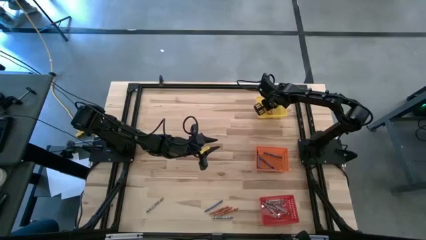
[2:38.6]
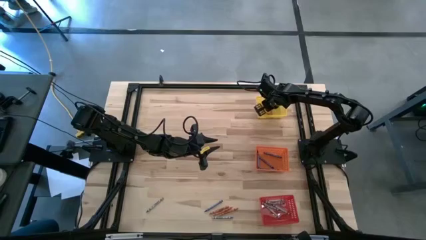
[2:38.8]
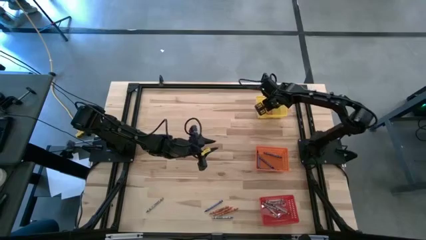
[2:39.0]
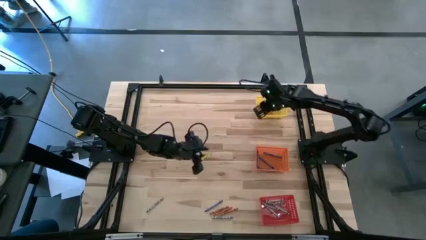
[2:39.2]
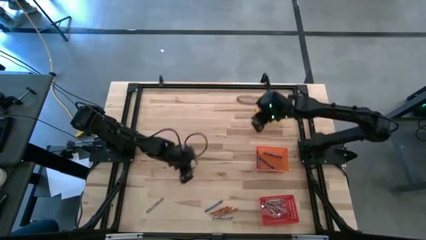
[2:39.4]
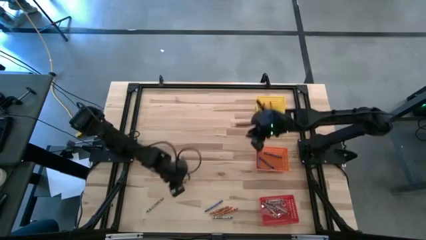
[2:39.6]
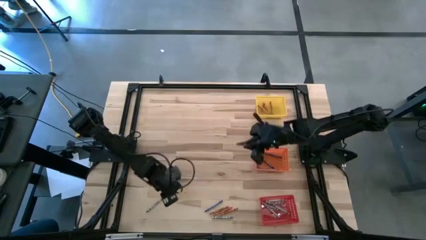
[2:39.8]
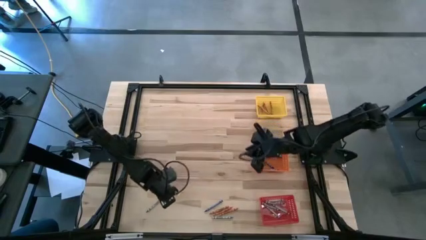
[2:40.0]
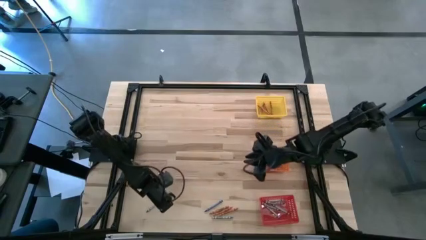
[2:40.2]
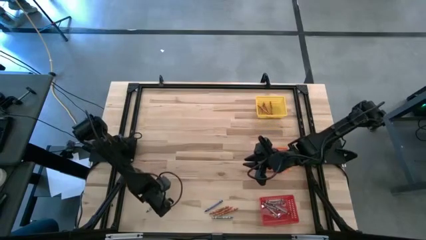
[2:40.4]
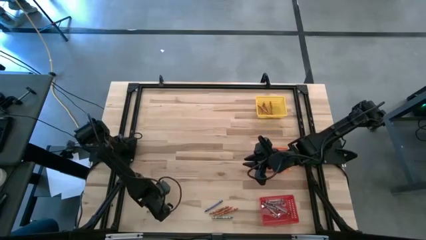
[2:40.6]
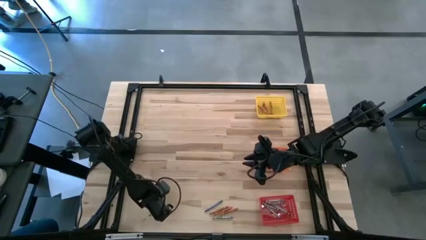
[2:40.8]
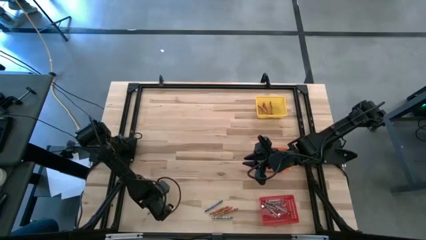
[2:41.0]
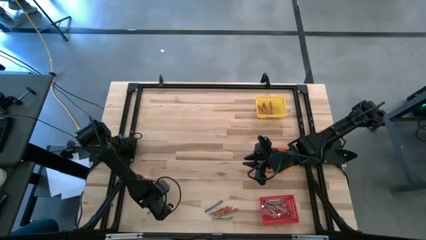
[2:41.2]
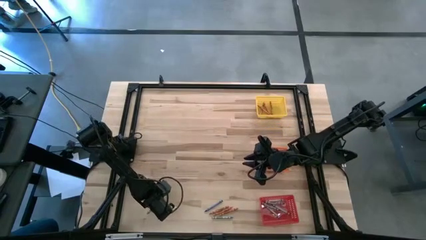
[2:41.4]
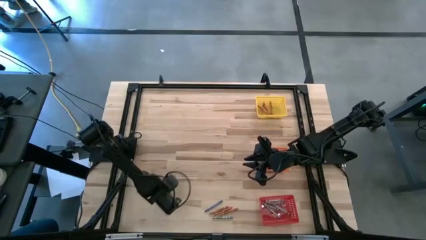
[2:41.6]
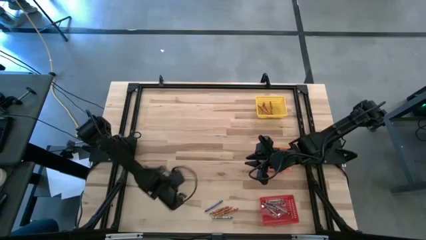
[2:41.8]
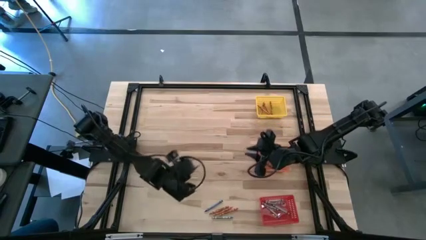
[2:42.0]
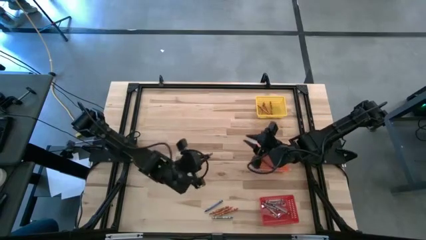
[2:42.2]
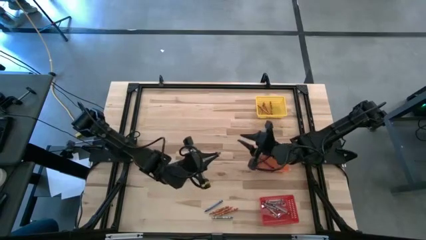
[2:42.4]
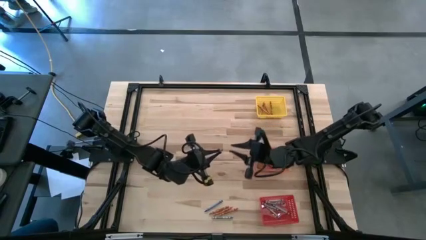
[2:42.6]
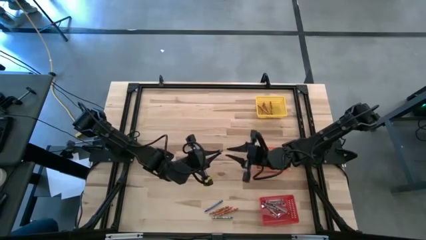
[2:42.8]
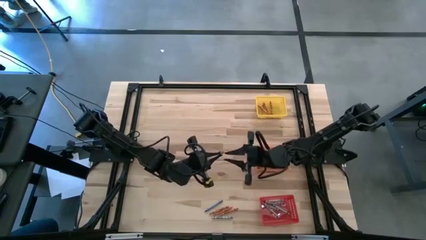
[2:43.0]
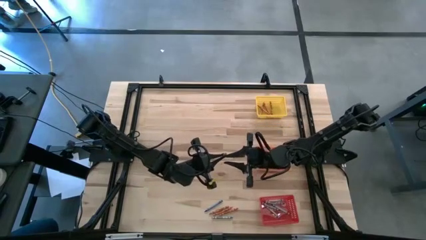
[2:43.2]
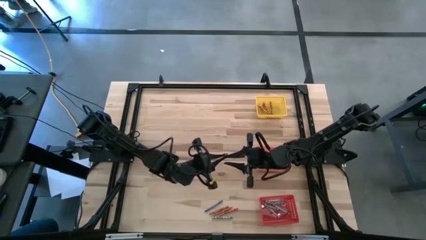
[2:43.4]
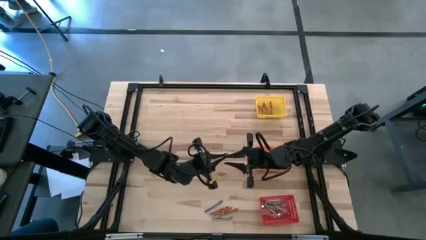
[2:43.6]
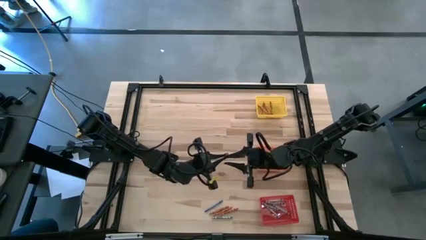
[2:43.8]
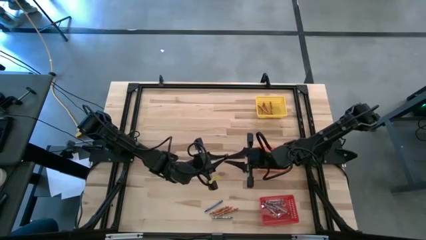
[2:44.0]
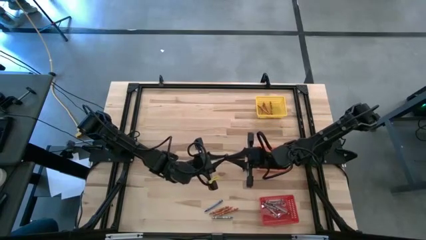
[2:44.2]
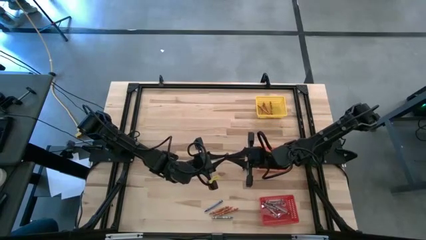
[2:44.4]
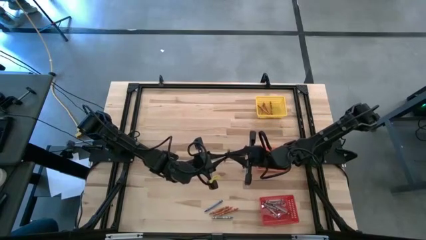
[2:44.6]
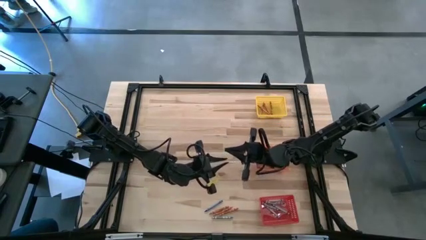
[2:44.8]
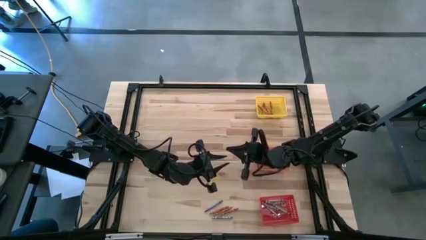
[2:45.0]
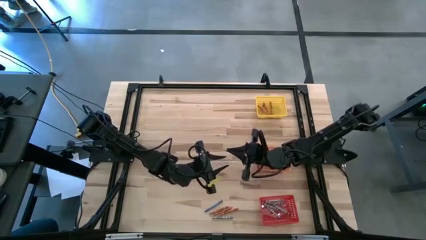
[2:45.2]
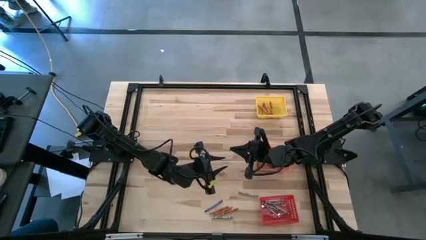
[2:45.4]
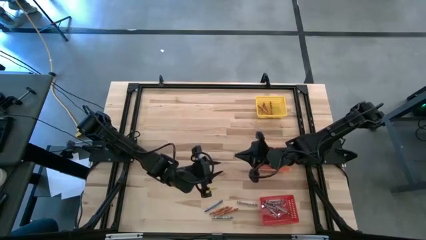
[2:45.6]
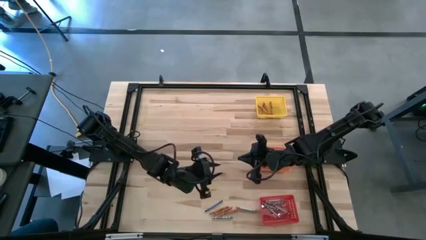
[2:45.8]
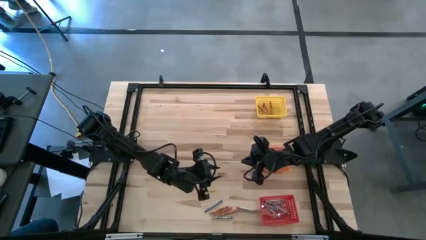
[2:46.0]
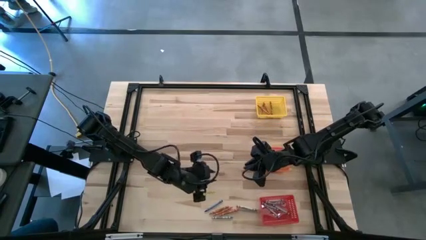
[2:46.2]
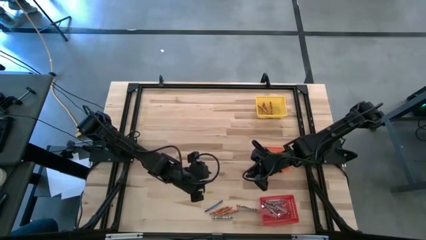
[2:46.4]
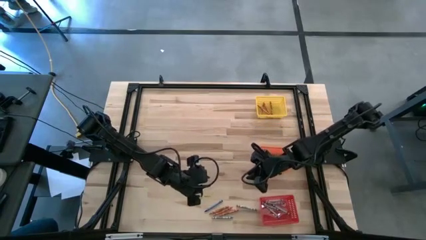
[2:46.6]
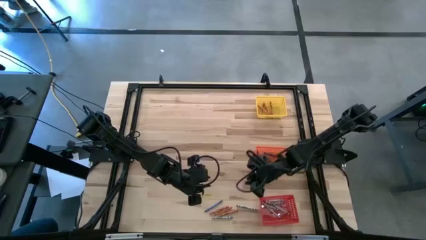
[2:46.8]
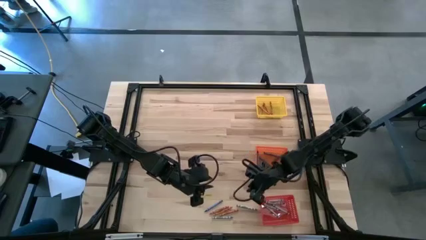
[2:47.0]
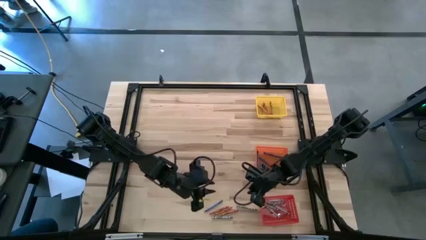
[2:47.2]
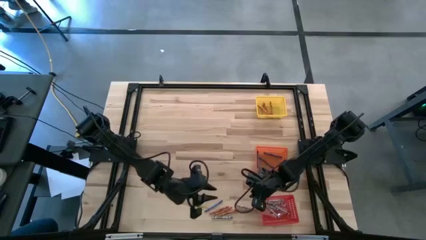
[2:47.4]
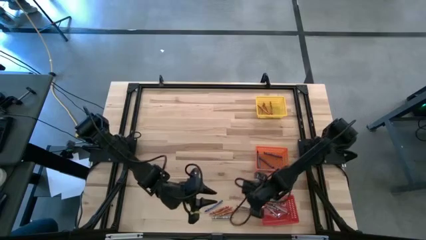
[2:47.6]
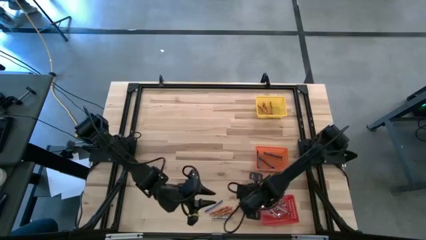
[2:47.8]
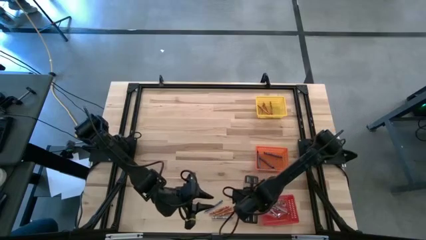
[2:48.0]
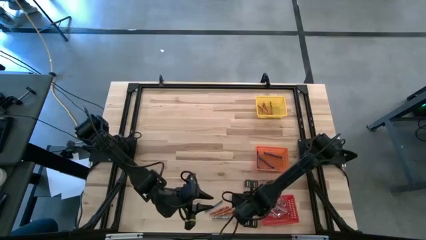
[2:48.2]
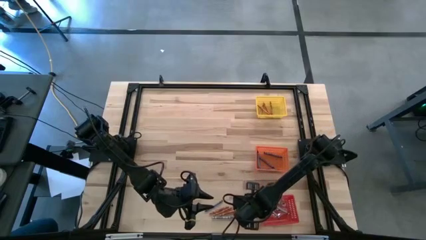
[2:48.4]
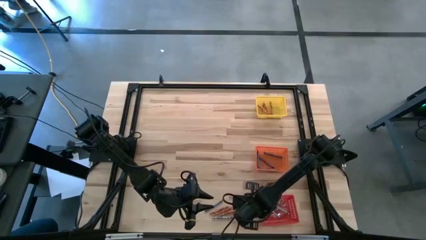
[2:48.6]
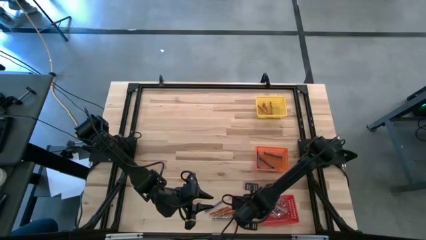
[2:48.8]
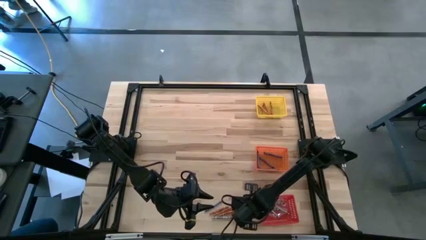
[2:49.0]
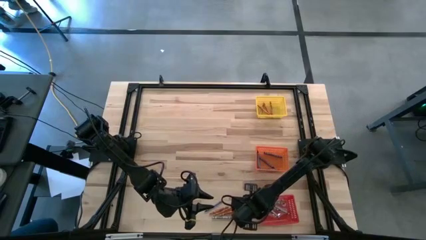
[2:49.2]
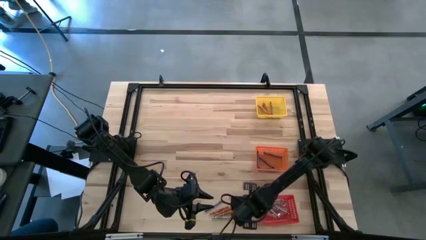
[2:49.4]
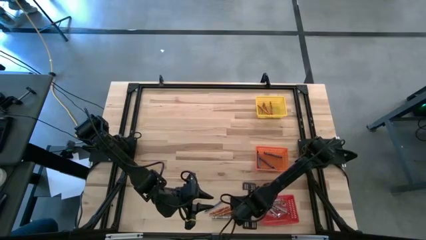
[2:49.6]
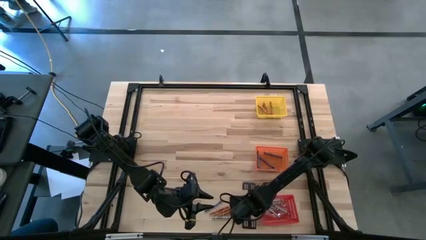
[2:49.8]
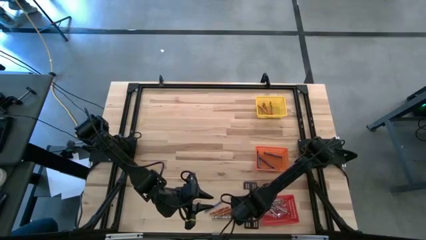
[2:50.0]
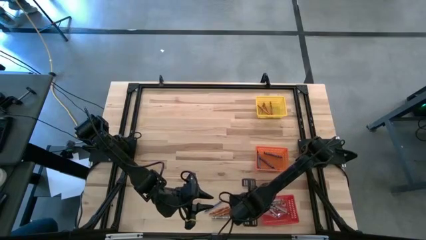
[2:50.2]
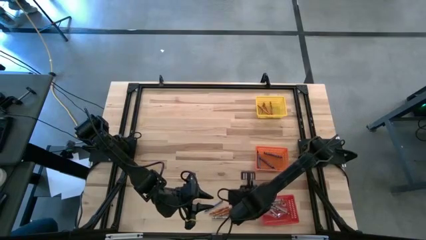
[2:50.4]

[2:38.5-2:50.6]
Task: Sort crayons
Put the gray crayon into the red bin
